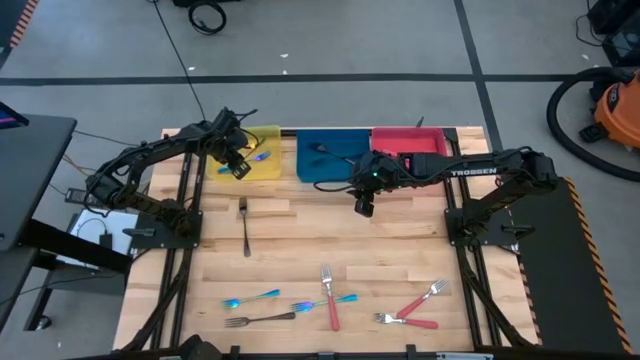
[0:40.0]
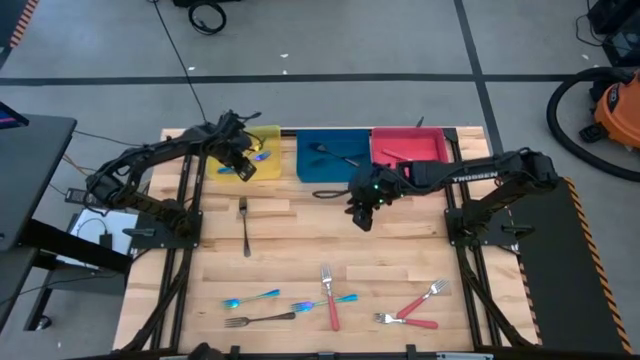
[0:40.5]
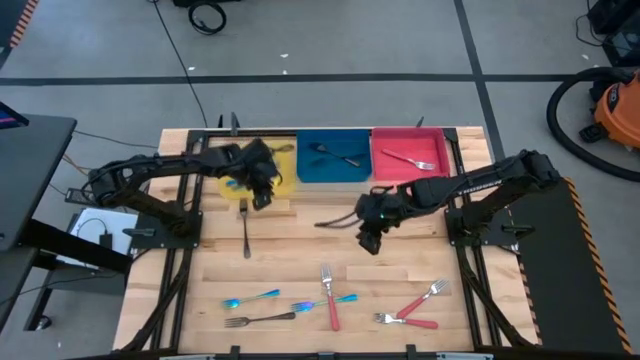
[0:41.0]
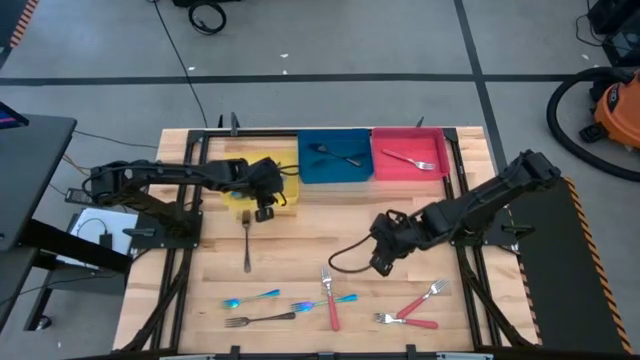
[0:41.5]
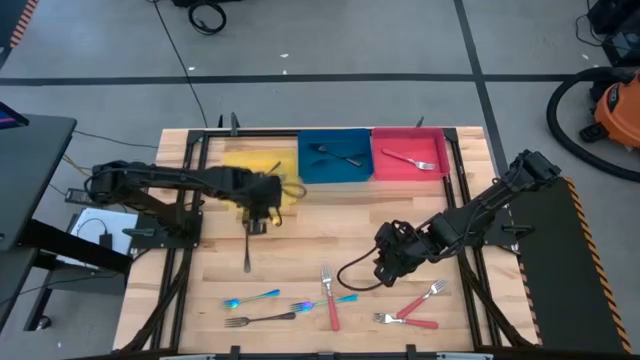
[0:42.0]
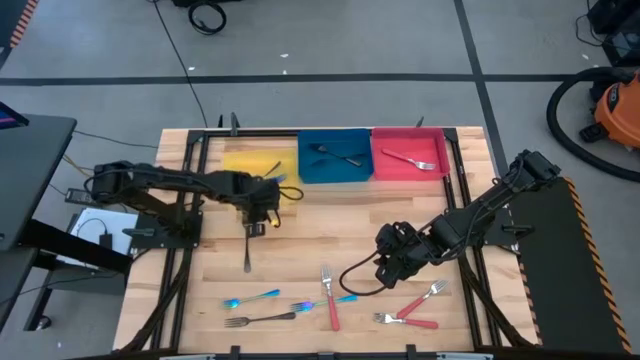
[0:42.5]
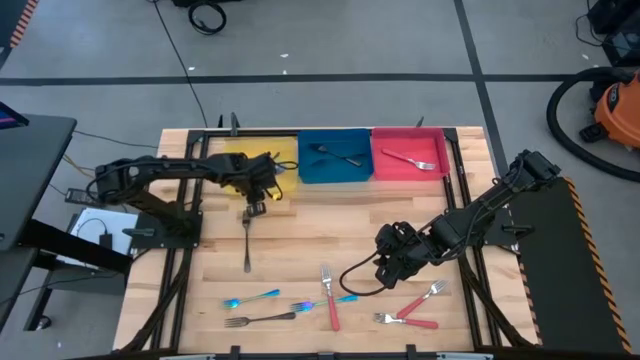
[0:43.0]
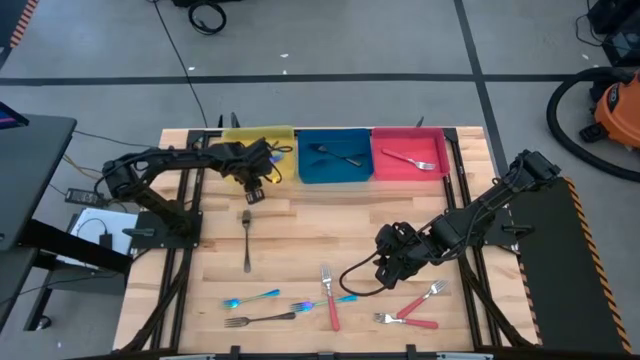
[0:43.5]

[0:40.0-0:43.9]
Task: Sort silverware by color (type)
Adjust the yellow bin

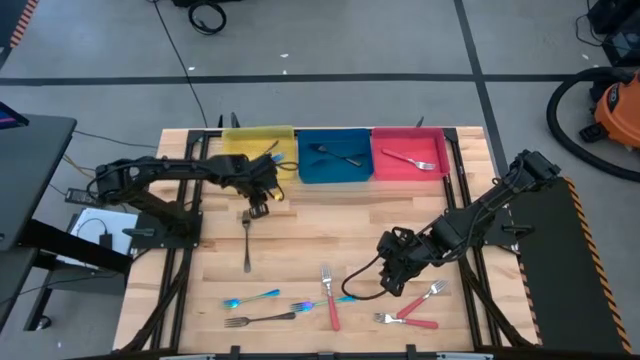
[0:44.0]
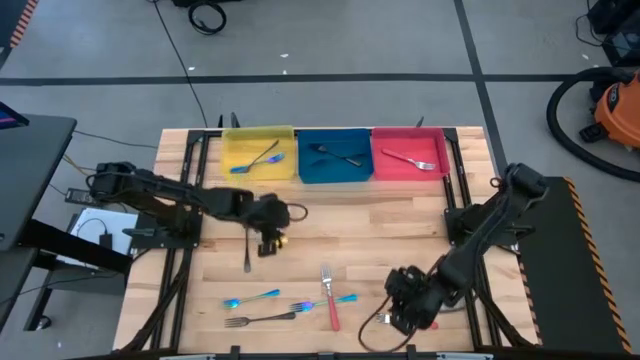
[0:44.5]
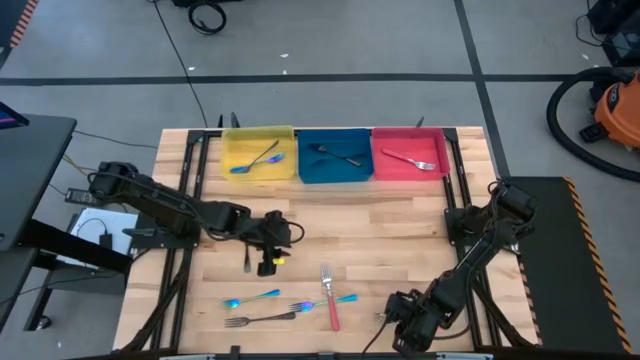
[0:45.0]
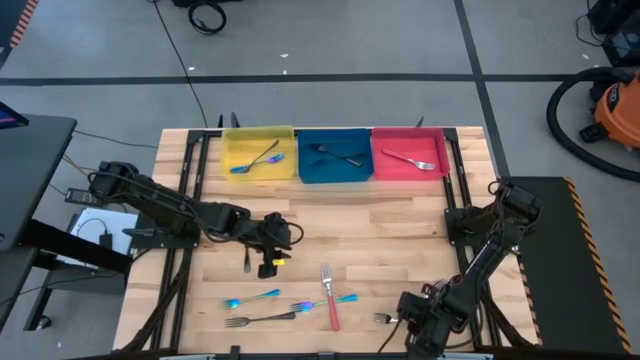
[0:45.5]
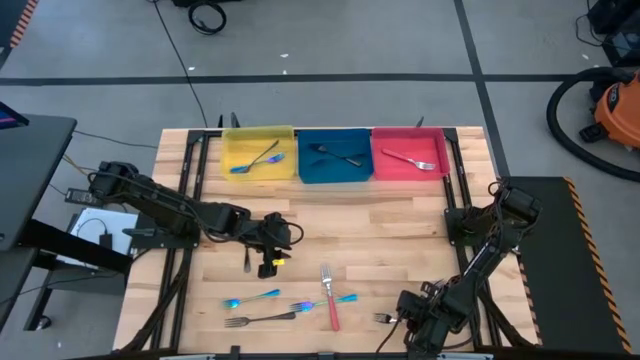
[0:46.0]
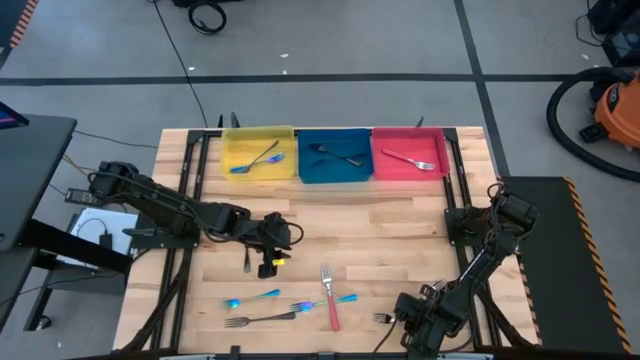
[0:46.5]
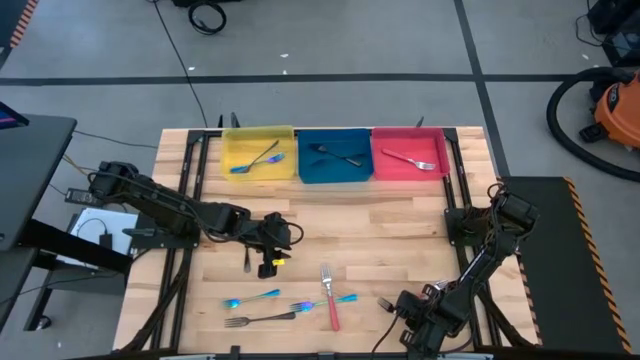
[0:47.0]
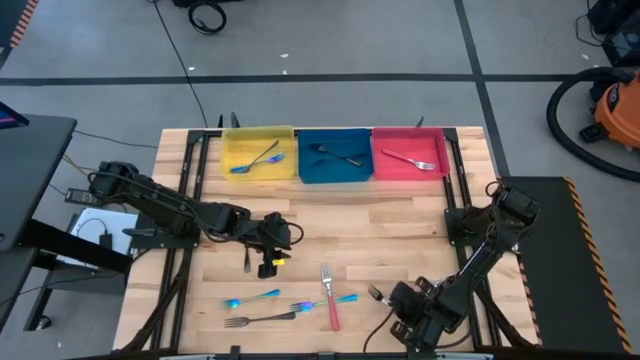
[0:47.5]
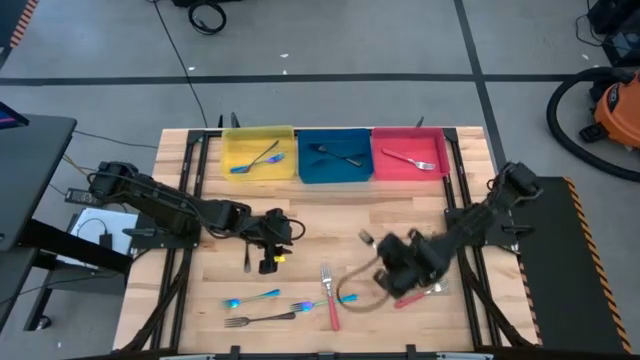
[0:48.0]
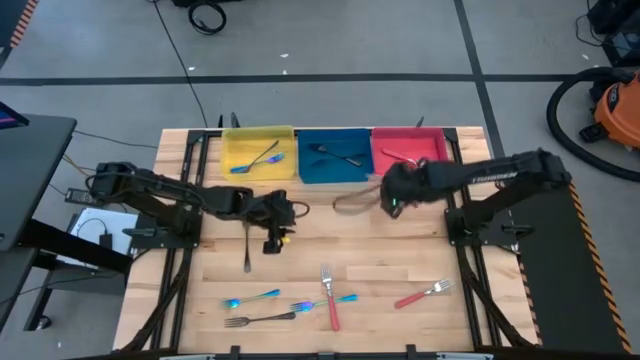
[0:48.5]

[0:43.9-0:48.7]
Put the pink fork into the pink bin

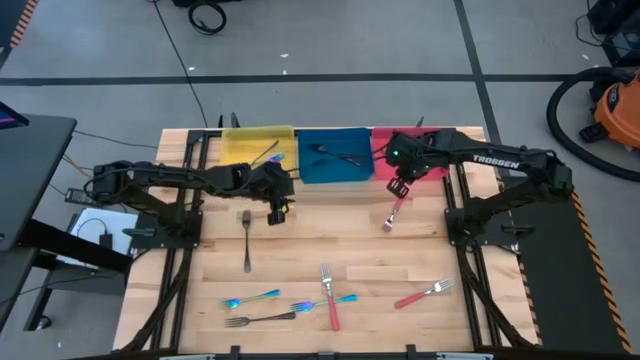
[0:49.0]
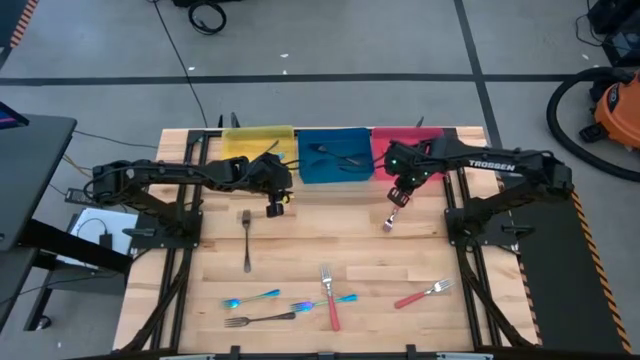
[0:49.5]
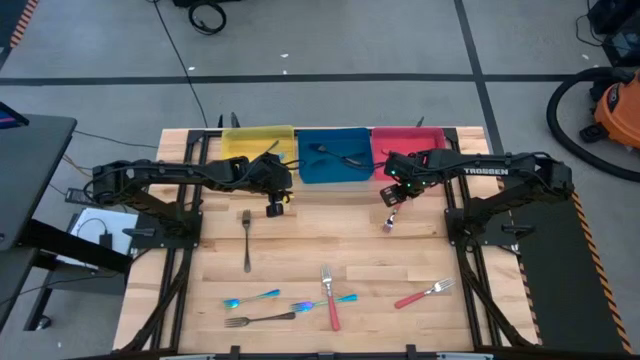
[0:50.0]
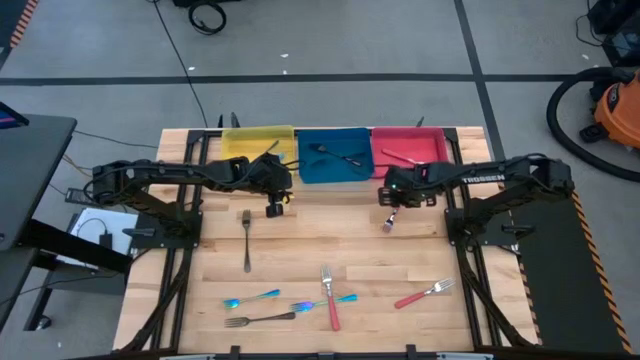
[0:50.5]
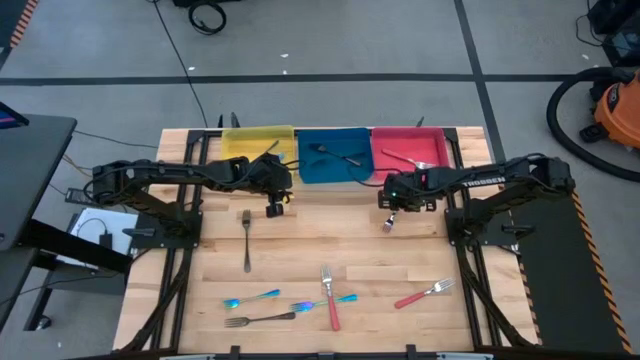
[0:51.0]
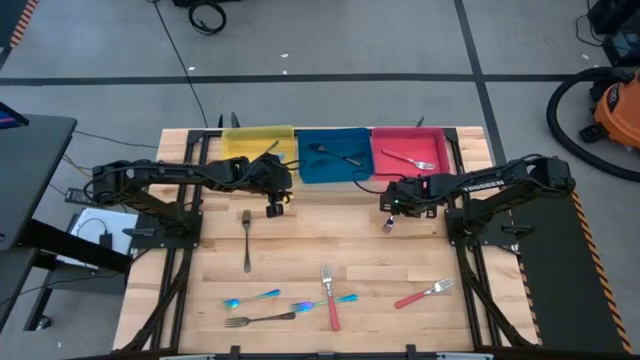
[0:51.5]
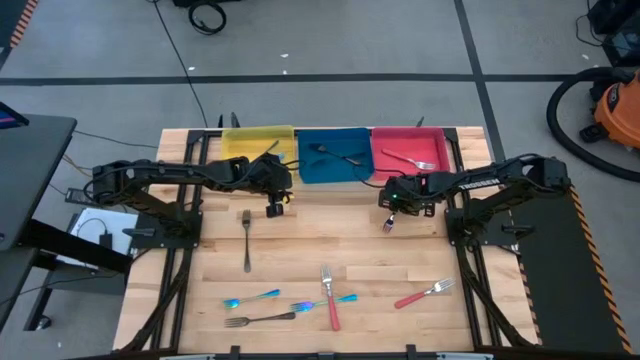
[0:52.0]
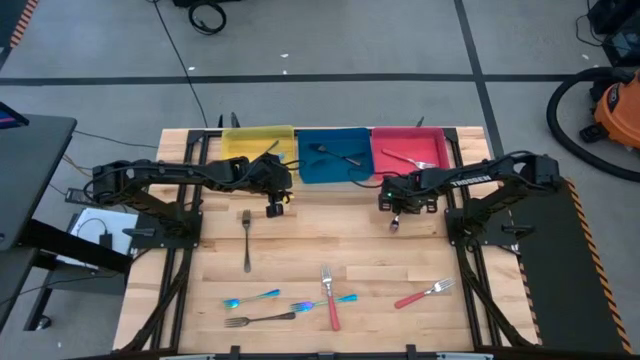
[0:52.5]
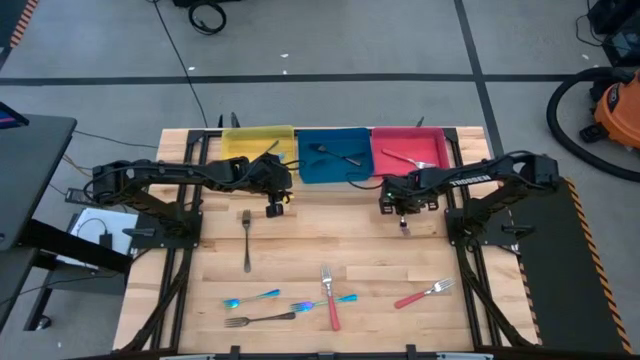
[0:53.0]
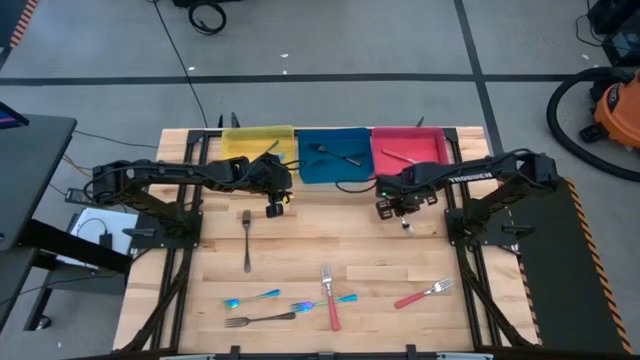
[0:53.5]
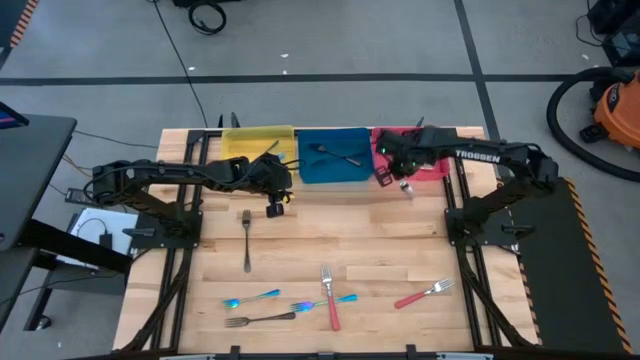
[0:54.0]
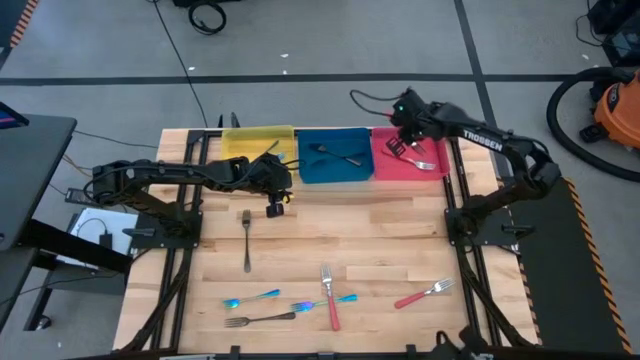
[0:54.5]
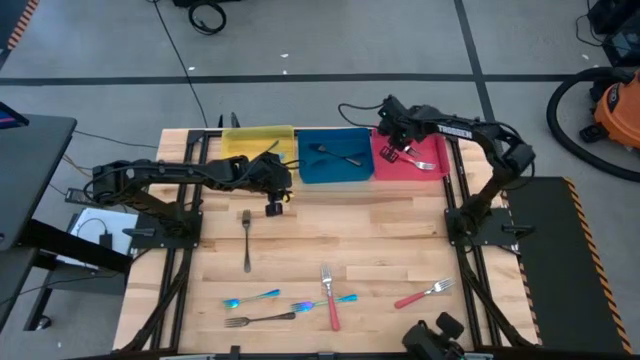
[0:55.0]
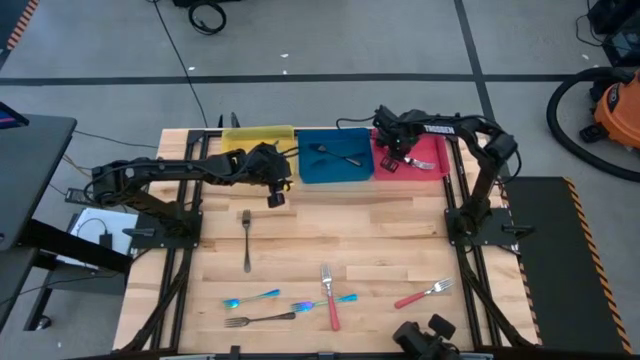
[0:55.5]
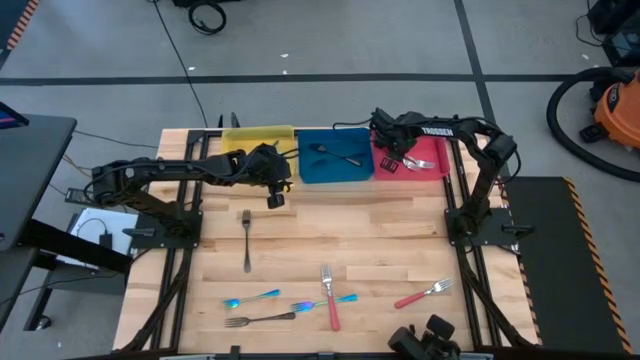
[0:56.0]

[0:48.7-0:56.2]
Put the pink fork into the pink bin

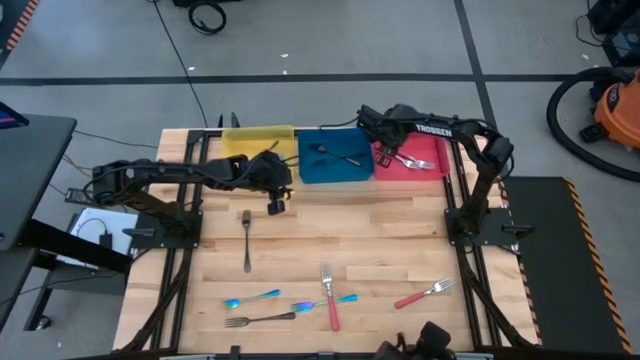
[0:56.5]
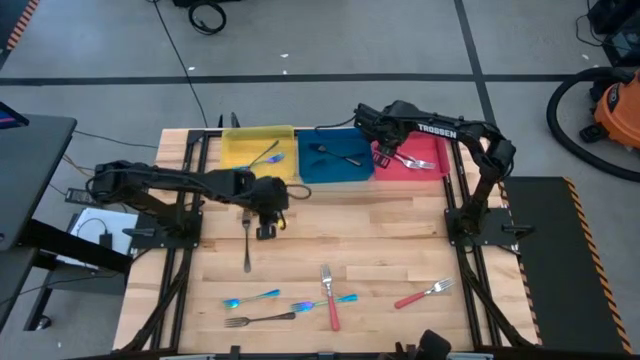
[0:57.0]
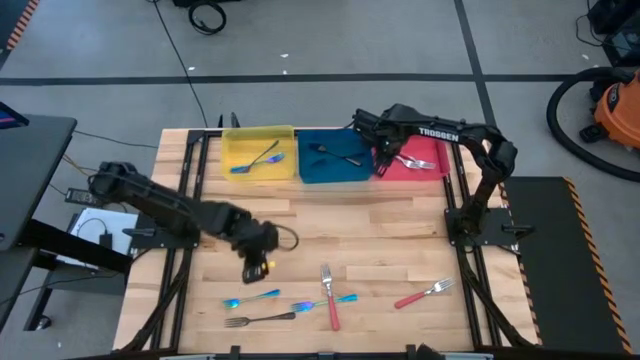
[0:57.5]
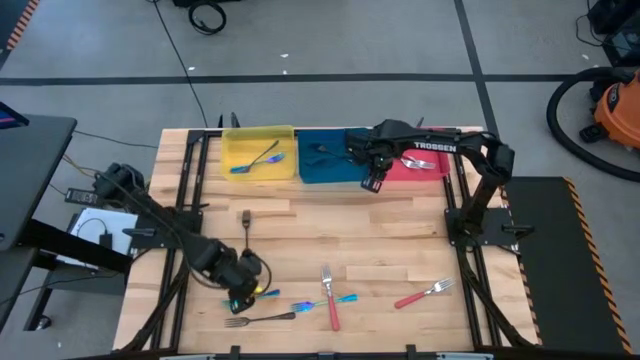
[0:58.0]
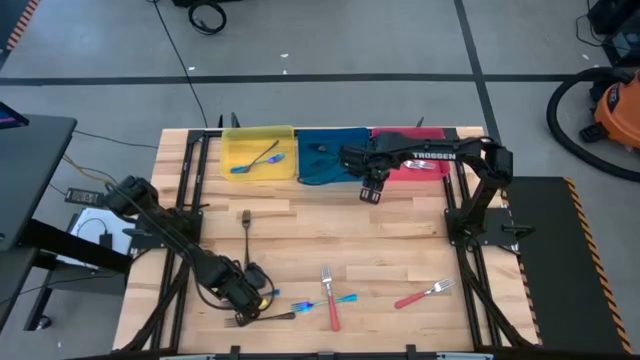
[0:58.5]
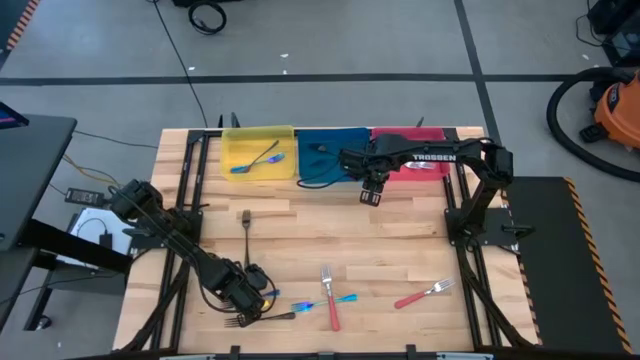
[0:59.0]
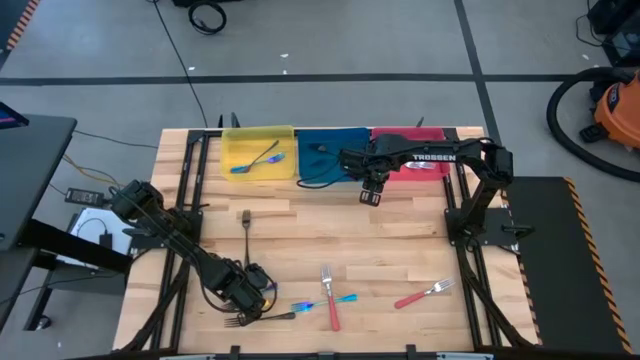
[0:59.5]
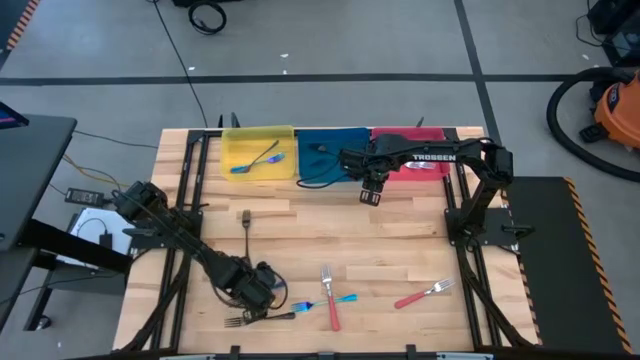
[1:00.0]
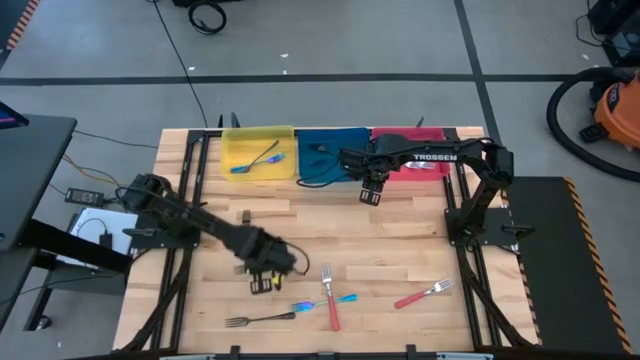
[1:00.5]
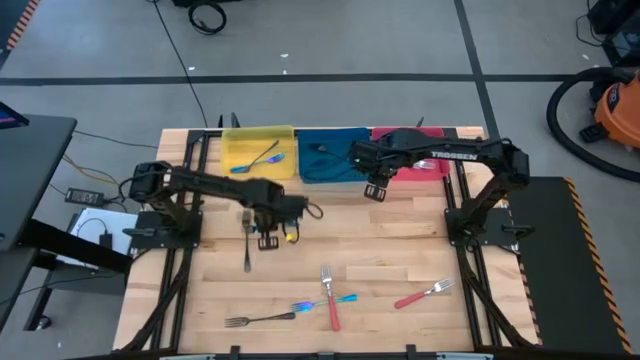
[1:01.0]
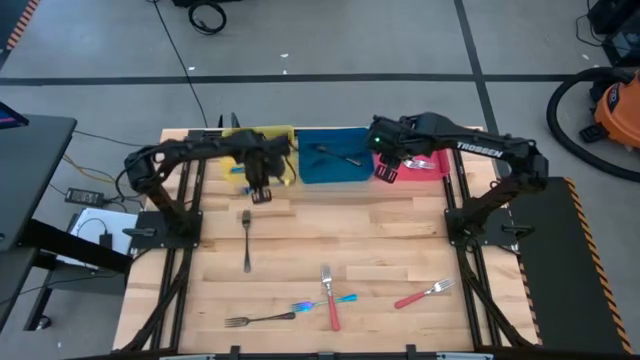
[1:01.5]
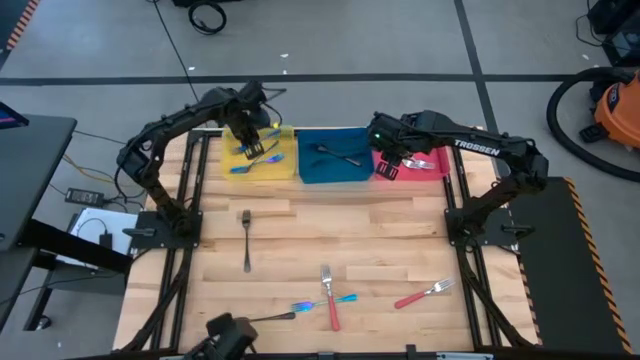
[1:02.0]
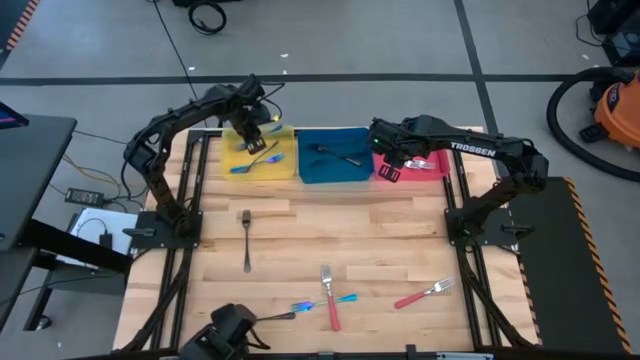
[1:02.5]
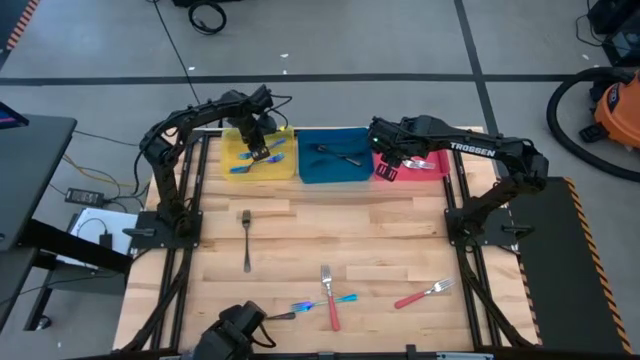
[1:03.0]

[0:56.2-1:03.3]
Put the blue fork into the yellow bin
